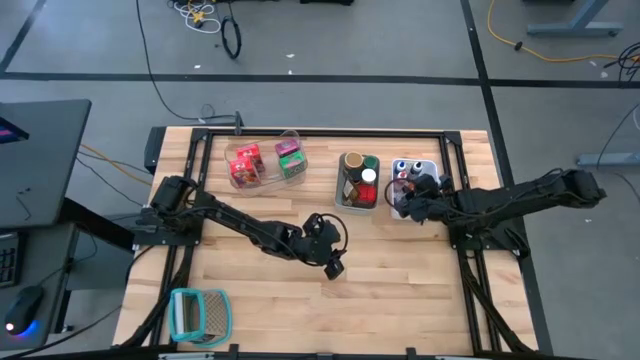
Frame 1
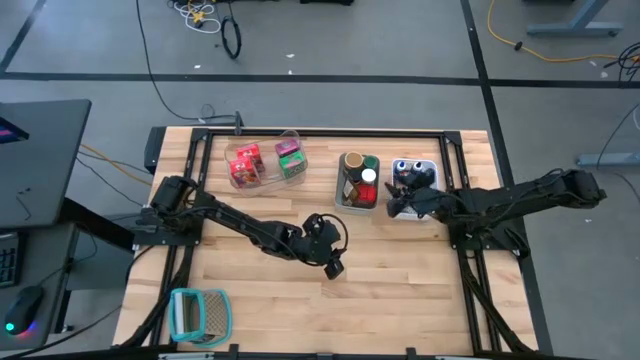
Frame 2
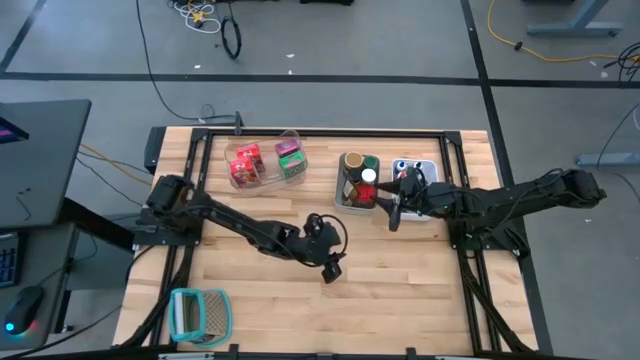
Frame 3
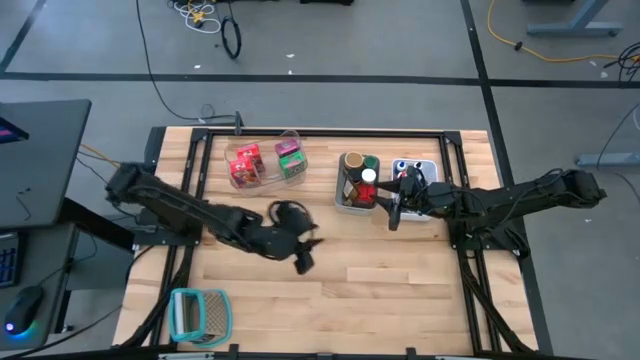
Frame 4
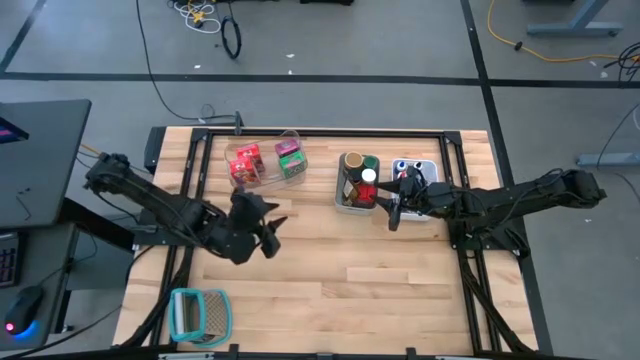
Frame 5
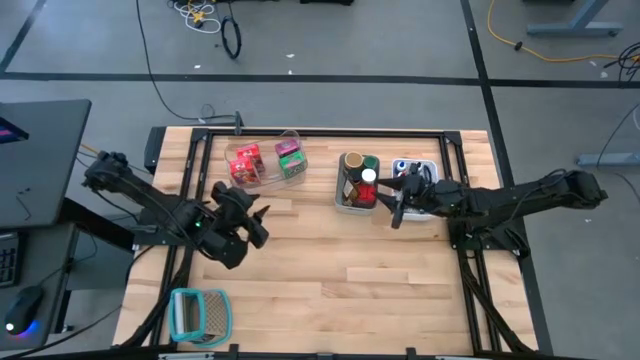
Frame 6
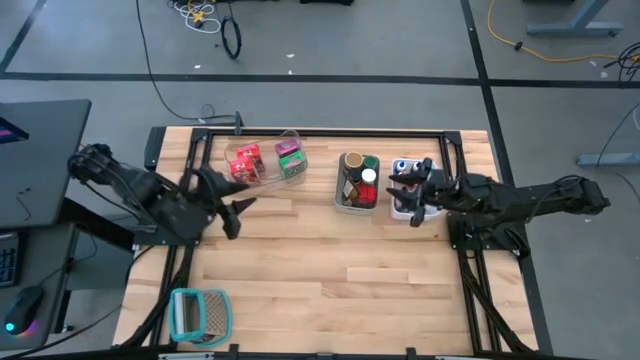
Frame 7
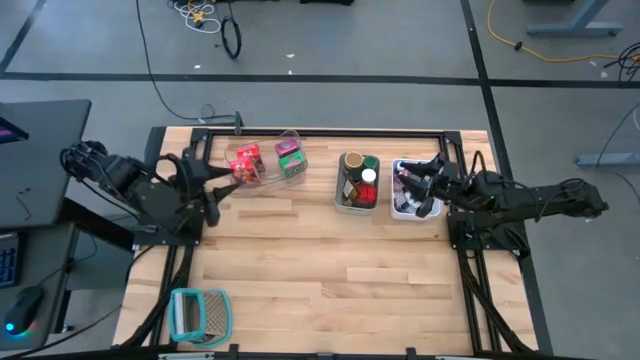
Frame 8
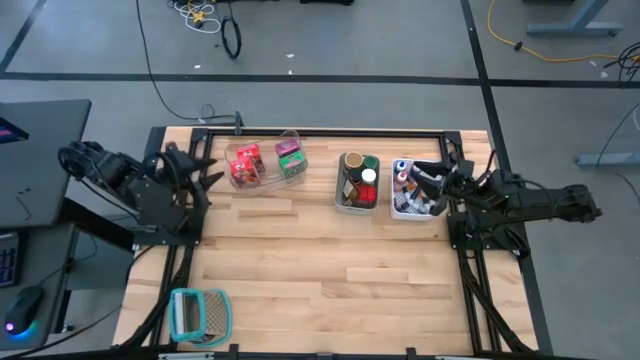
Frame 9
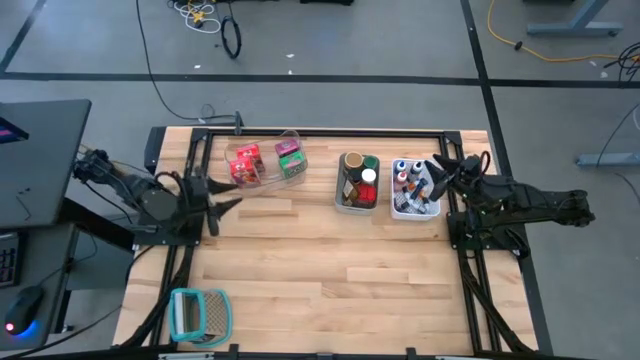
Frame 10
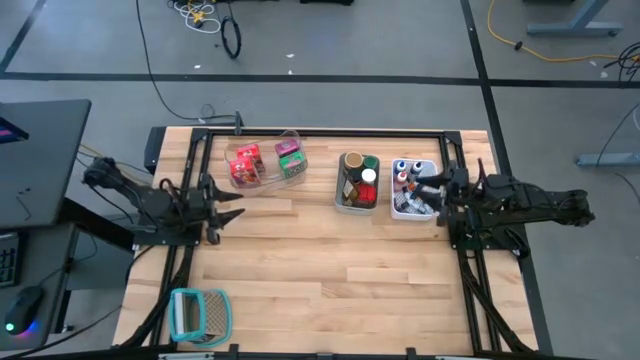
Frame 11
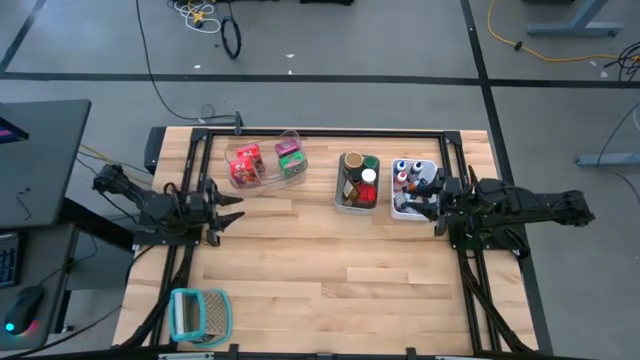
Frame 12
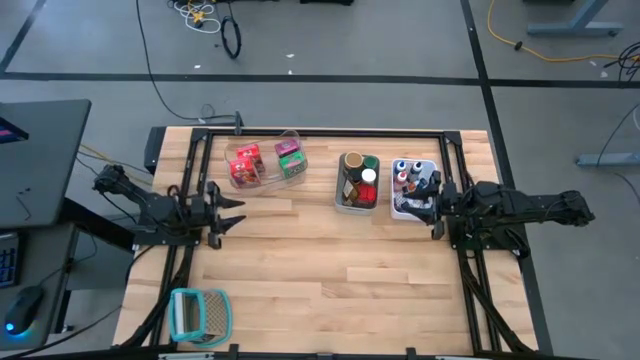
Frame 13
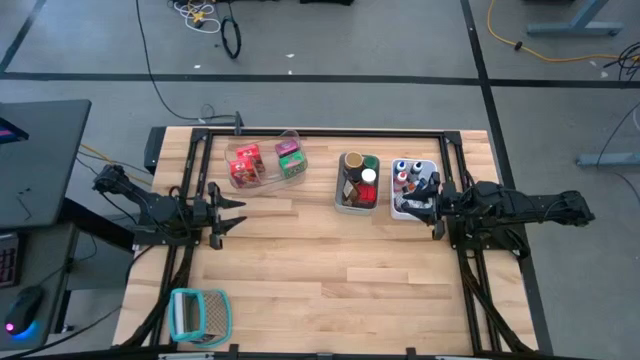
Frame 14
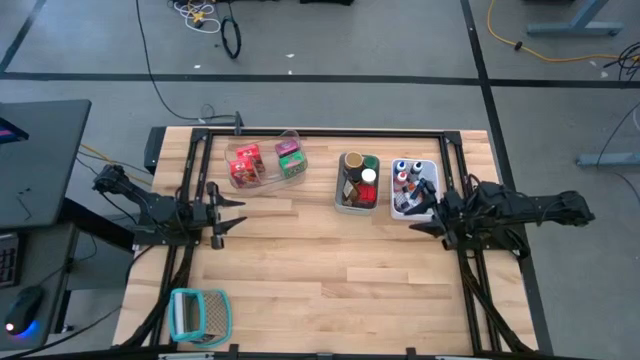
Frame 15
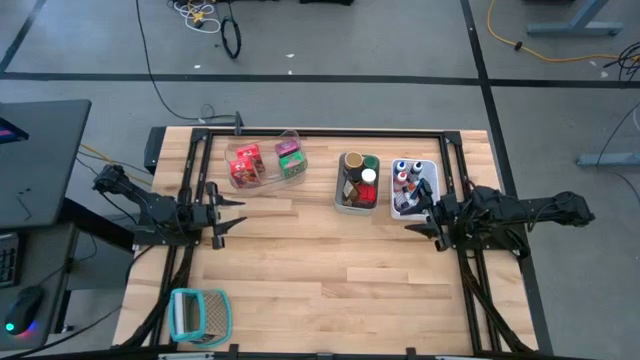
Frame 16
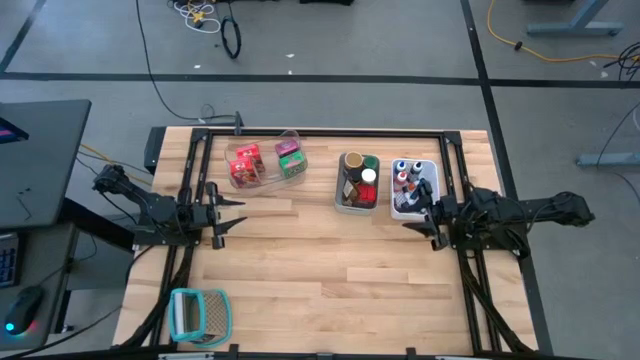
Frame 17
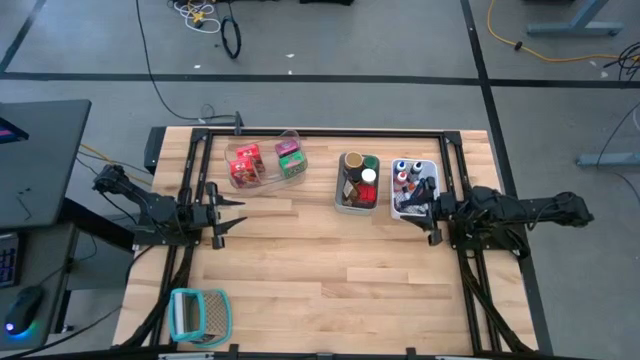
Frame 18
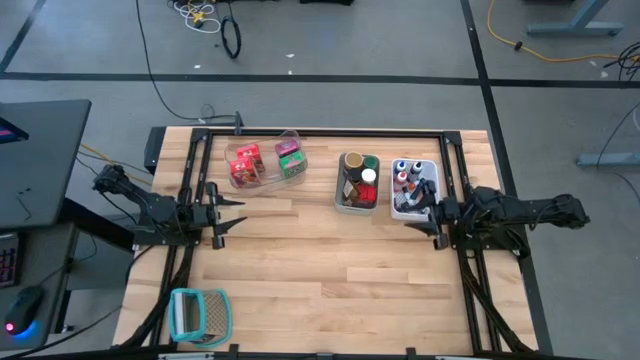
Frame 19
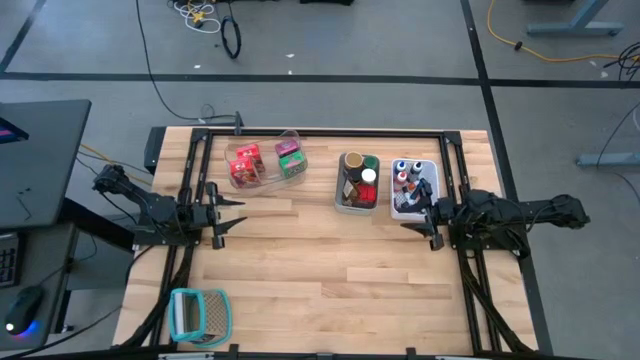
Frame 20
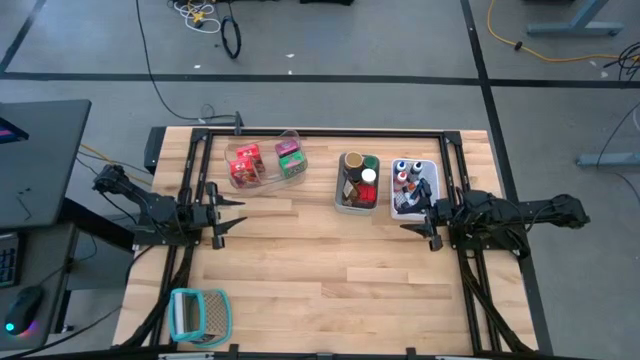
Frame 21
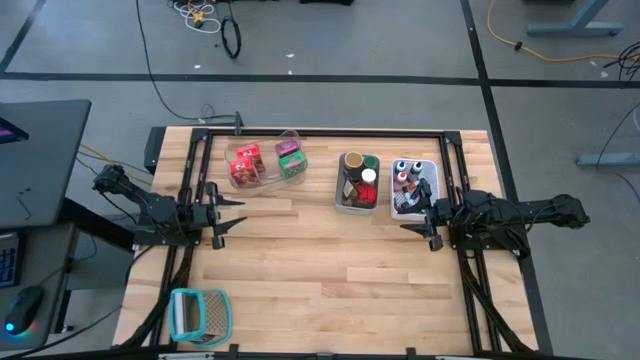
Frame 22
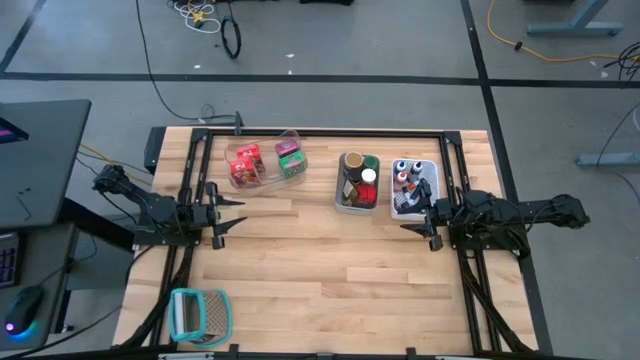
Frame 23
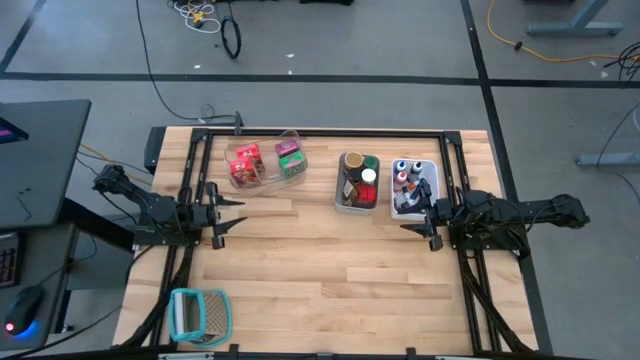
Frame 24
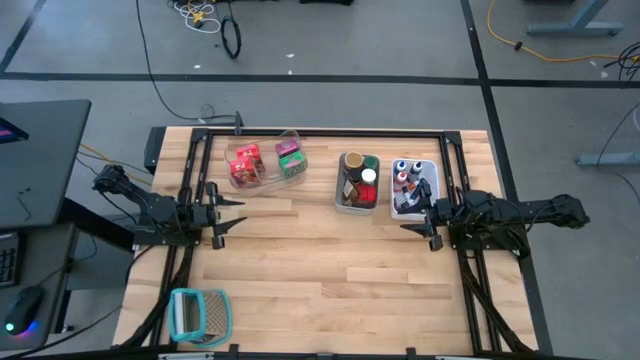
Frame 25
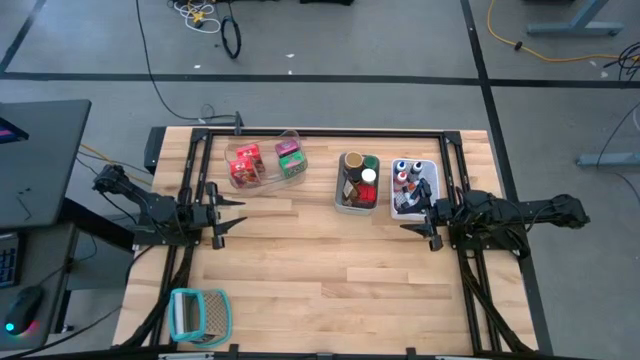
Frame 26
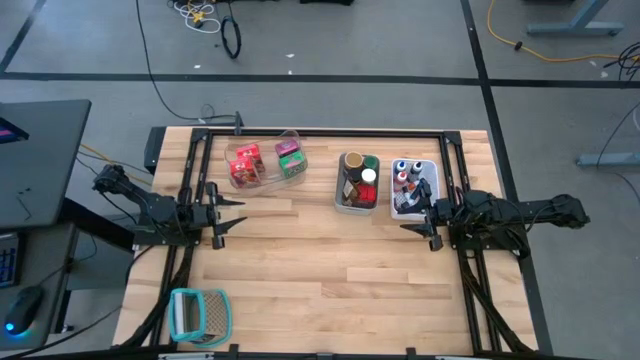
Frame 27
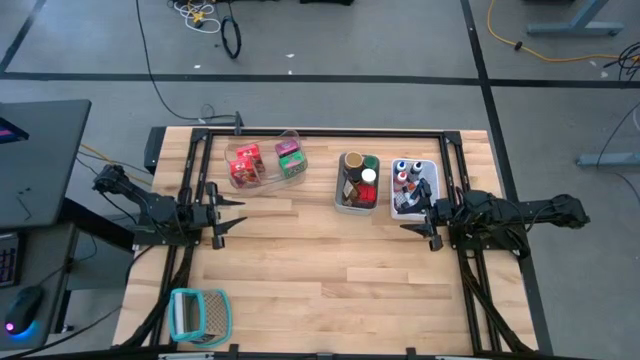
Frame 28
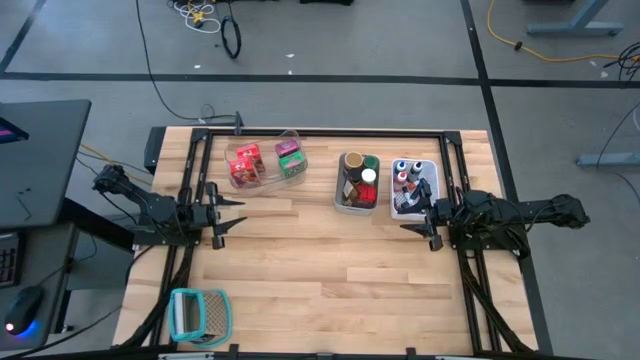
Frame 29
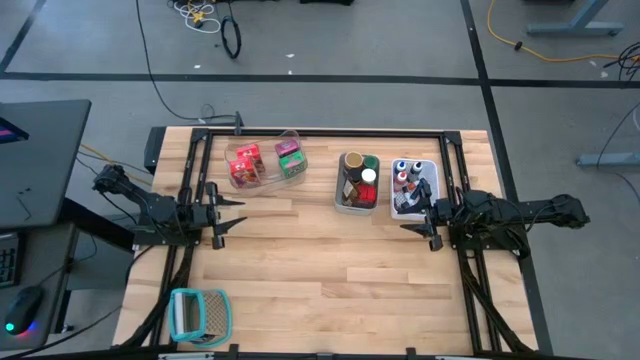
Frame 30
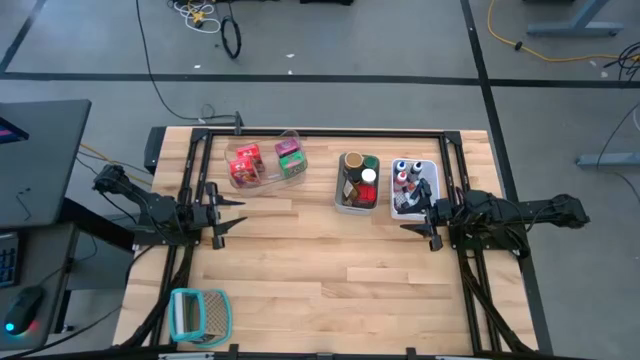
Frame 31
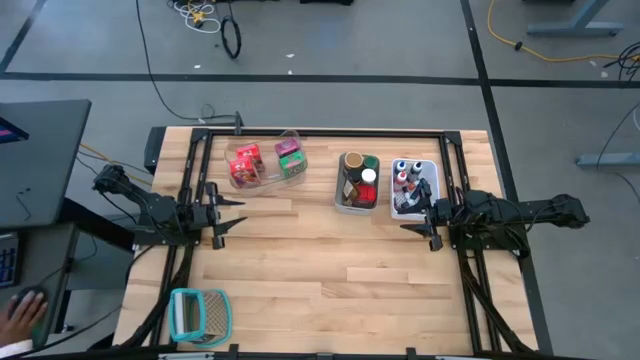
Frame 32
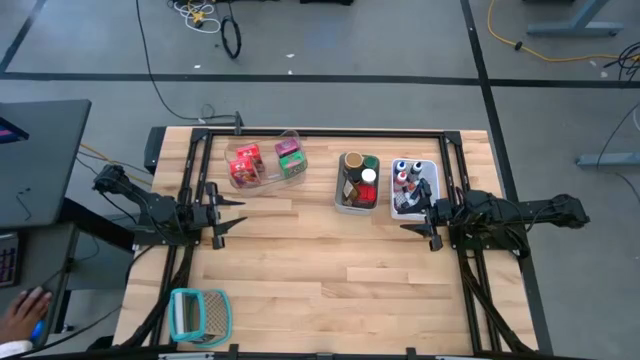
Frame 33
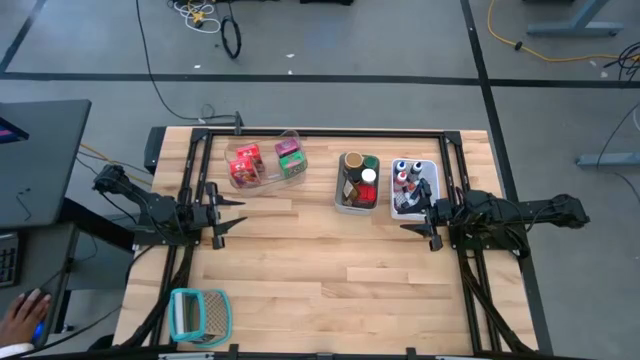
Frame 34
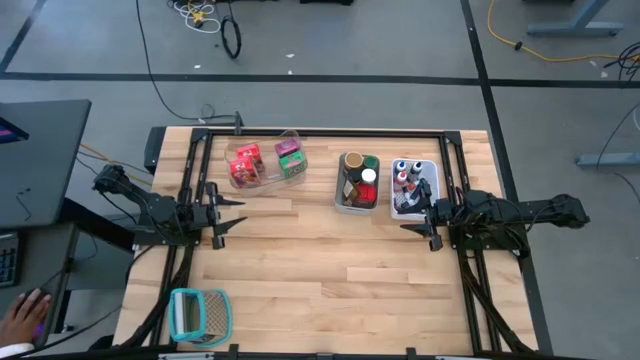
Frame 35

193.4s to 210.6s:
Task: Pick & Place Kitchen Items
Return to Home Position

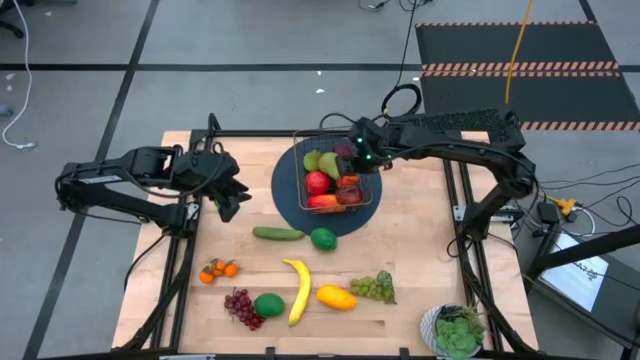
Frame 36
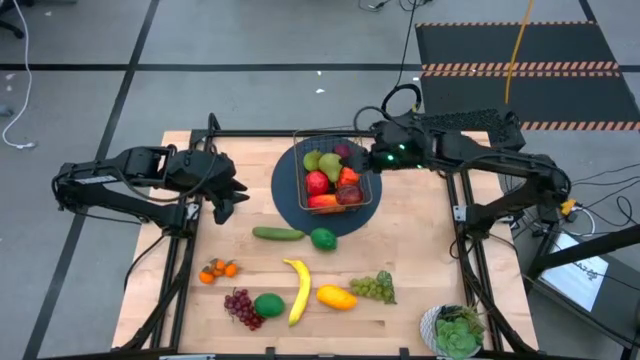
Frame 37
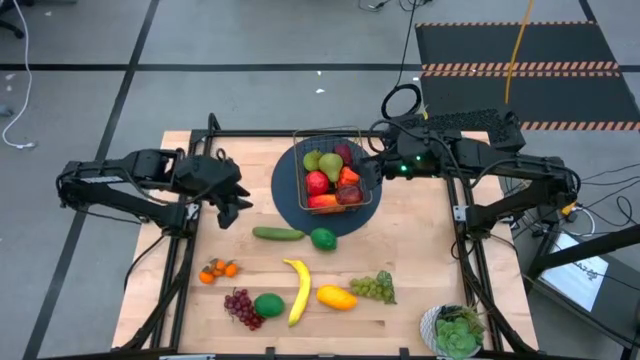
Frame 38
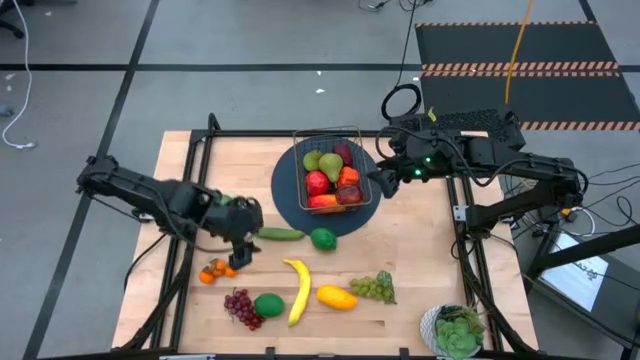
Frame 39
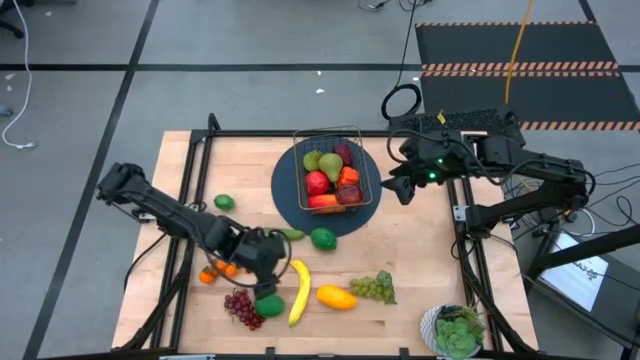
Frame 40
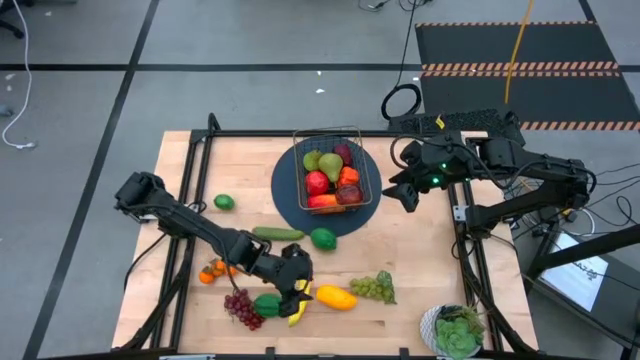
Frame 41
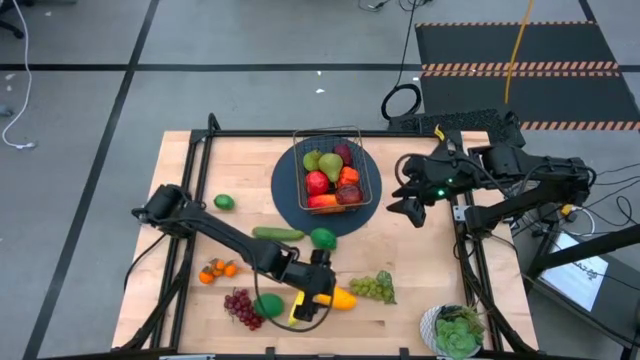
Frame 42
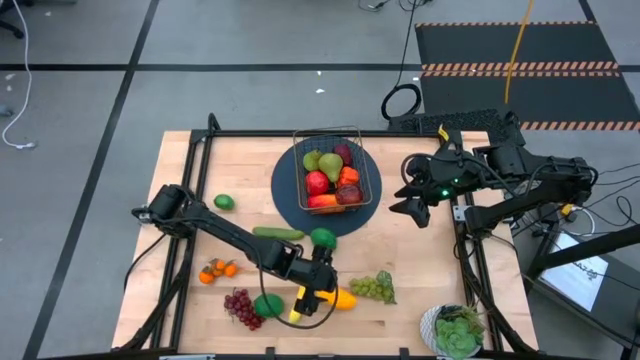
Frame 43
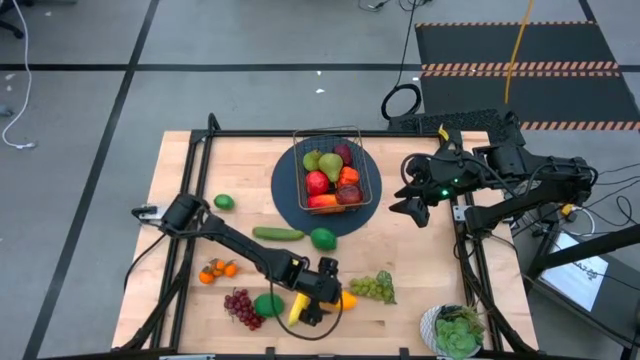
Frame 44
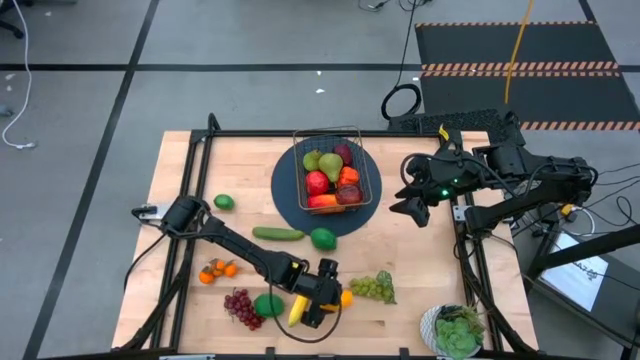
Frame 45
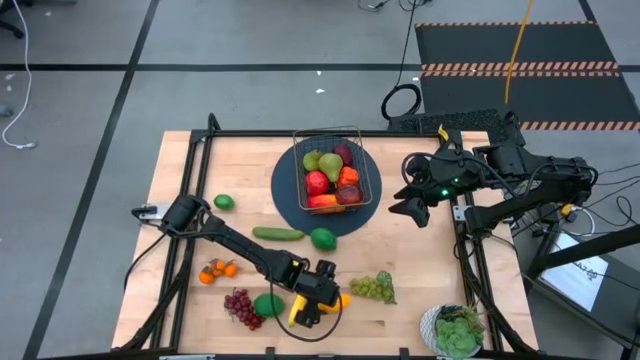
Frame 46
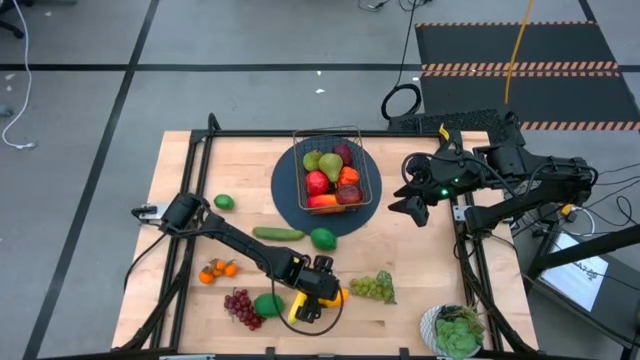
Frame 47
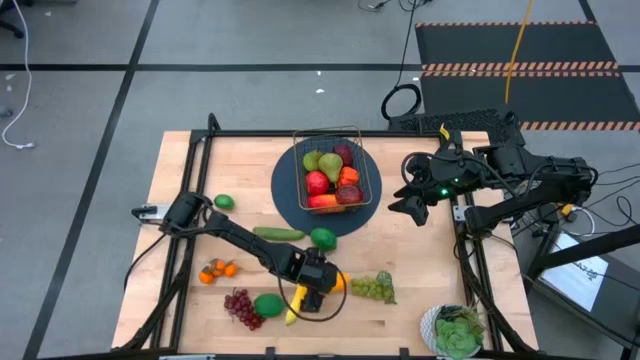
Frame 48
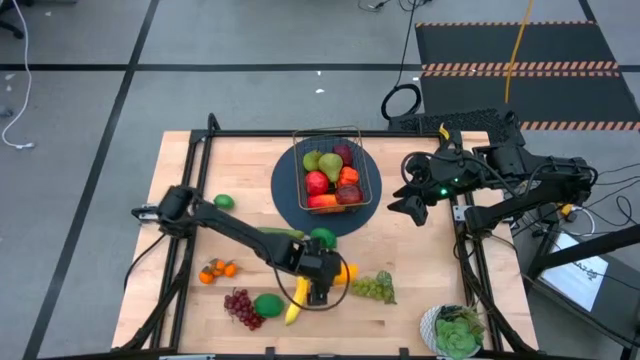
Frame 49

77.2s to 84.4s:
Task: Build produce basket
Put the red mango into the gold wire basket
